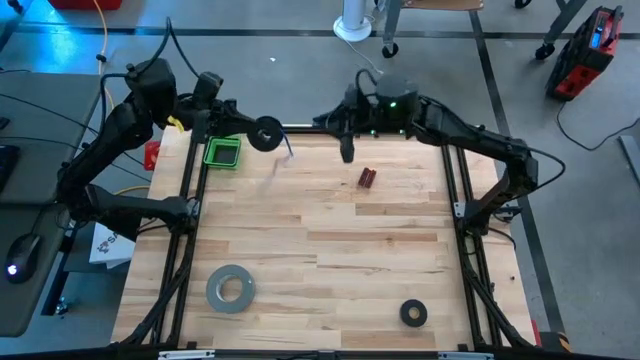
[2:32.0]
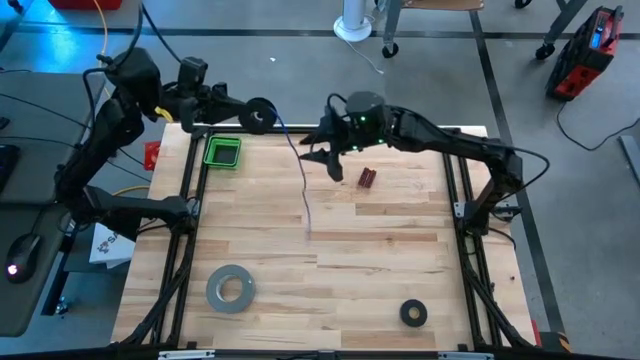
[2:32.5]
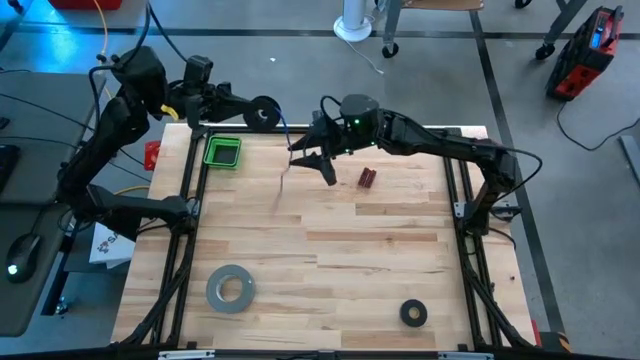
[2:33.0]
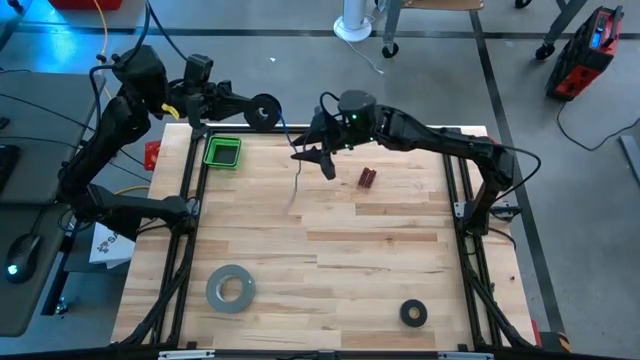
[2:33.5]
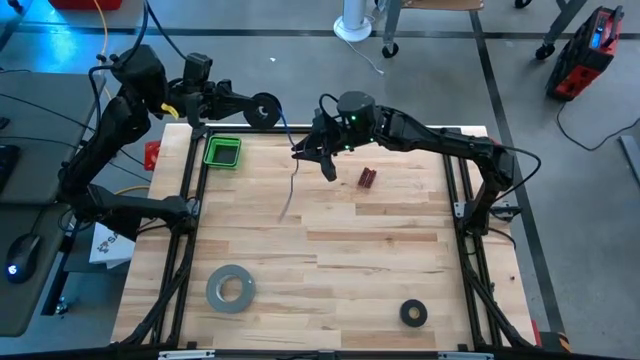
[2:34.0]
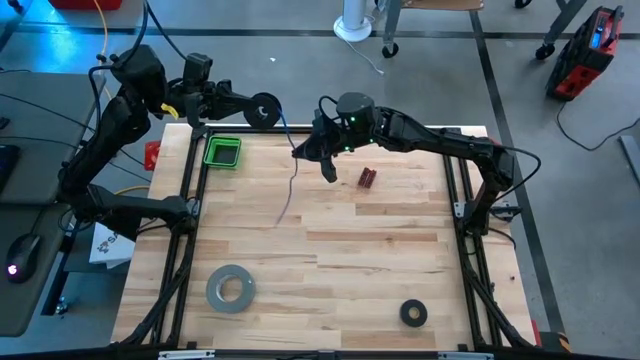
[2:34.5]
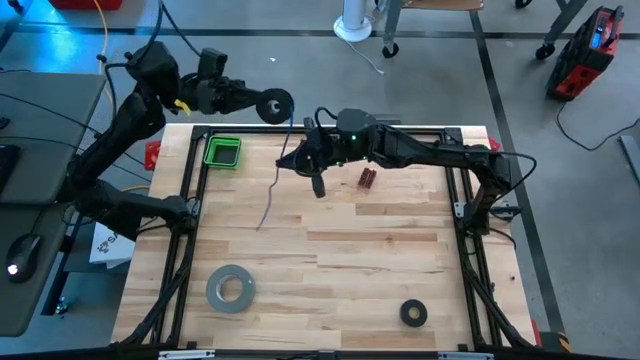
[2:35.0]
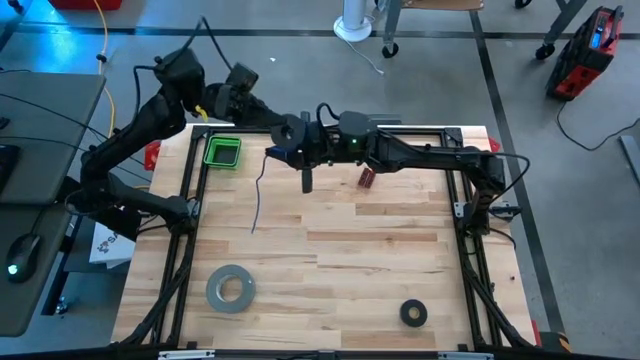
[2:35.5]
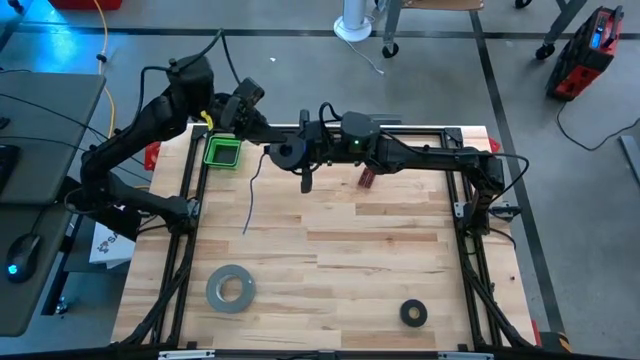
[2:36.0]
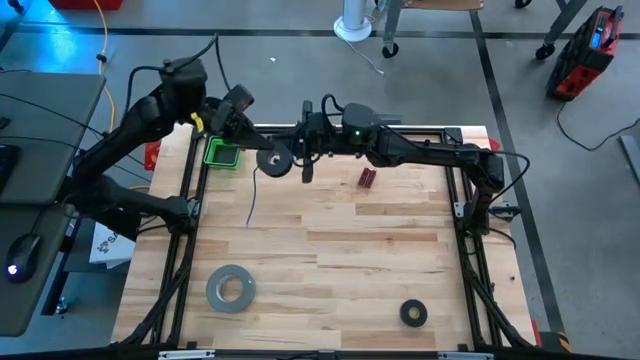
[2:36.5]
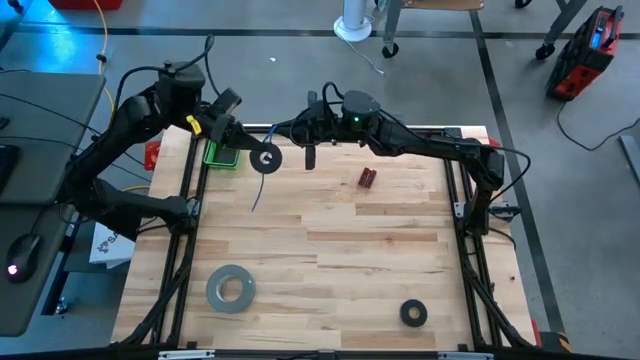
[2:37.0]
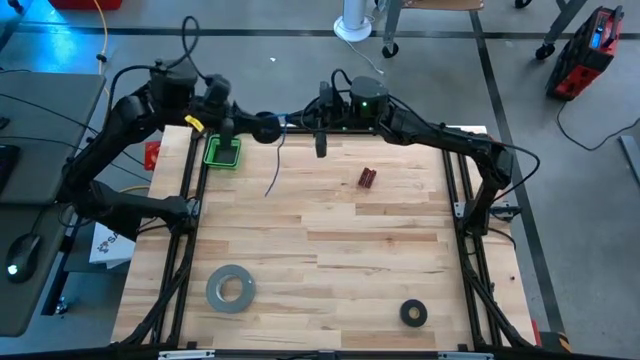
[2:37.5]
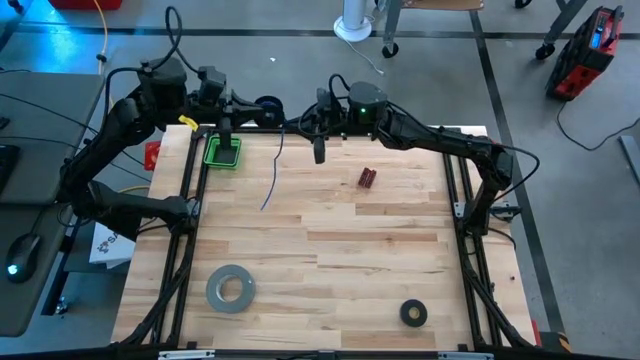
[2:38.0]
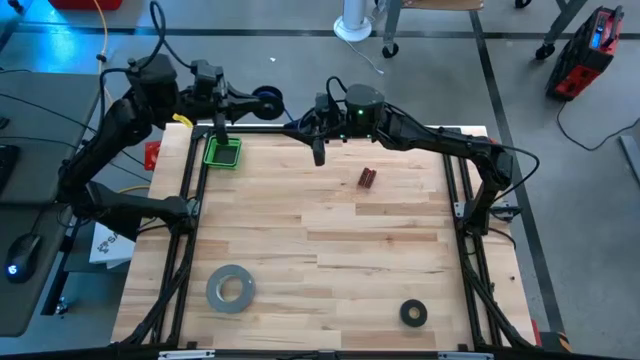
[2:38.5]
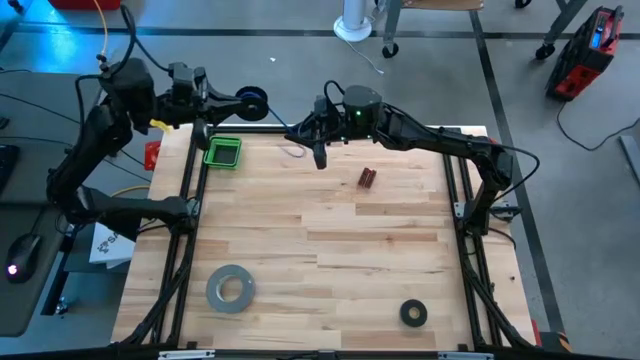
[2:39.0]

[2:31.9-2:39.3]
Task: Coil cords
Coil the blue wire onto the spool

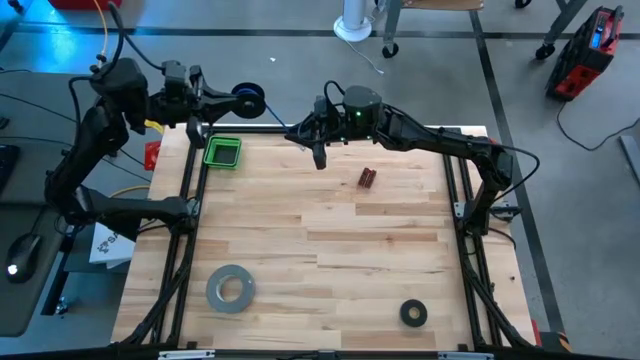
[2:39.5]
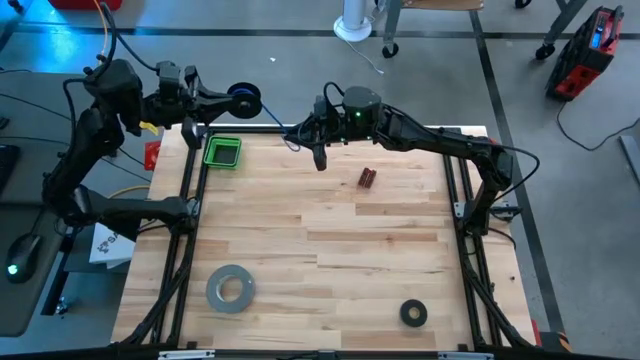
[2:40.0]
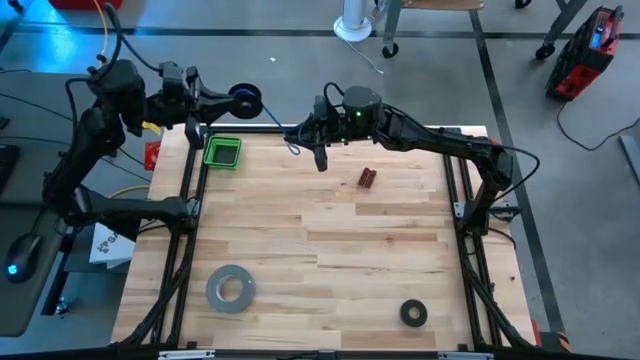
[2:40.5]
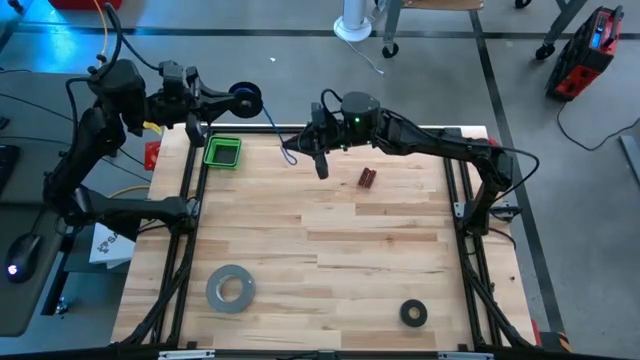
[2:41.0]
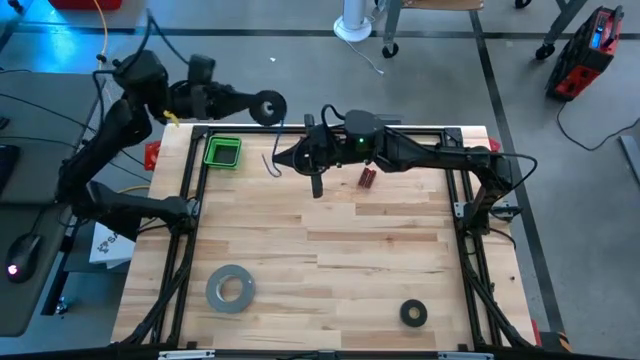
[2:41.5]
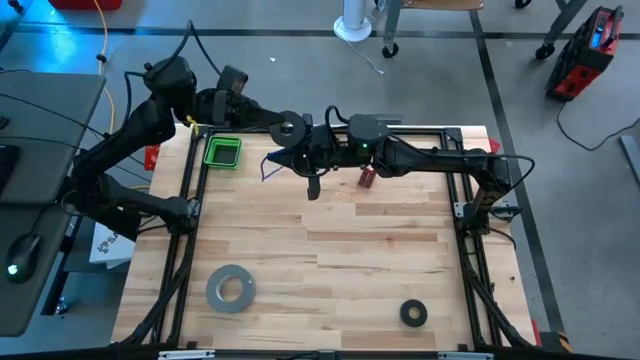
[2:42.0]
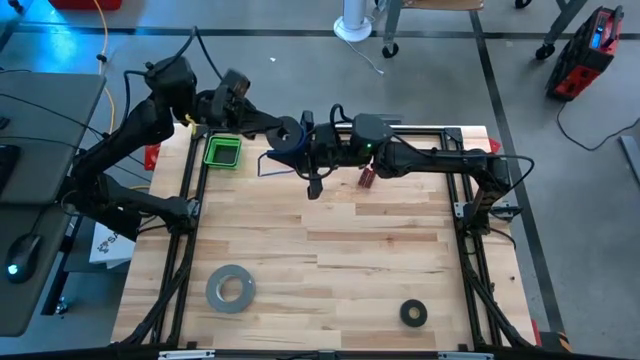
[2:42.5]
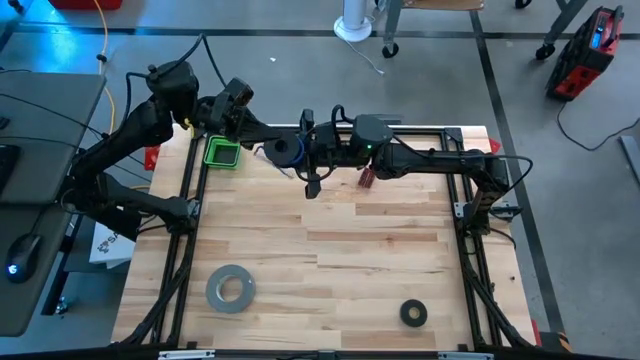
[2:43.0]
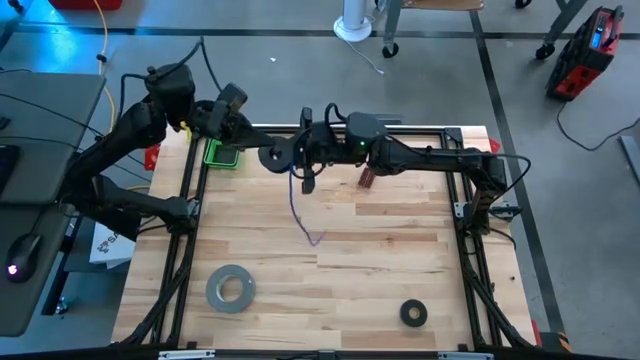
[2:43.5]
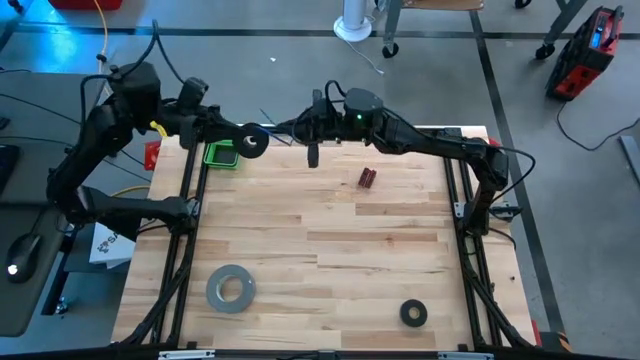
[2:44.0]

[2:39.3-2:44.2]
Coil the blue wire onto the spool

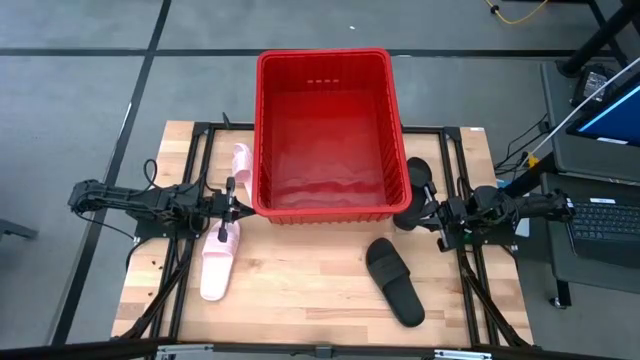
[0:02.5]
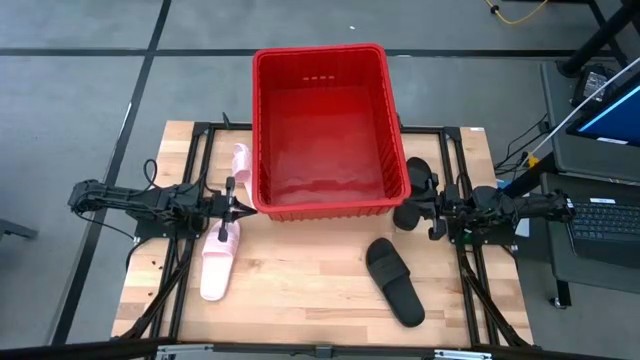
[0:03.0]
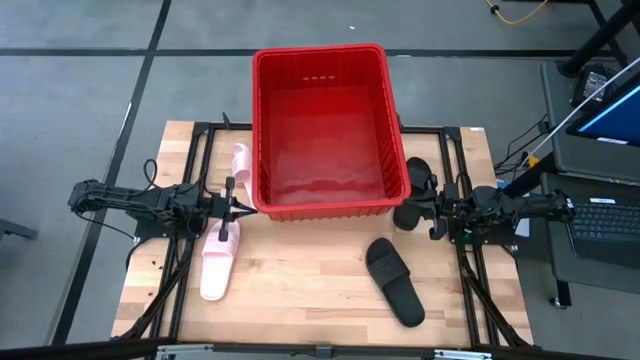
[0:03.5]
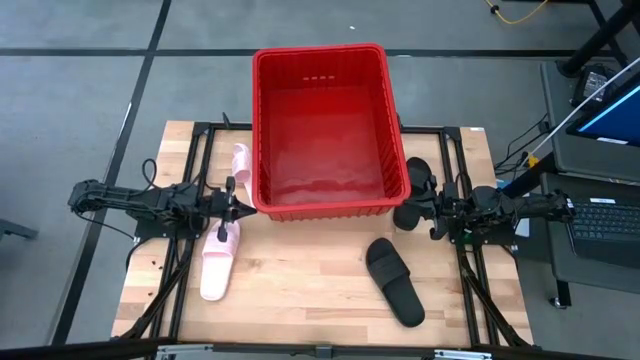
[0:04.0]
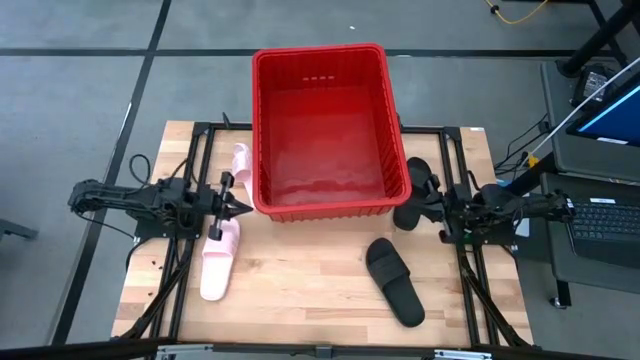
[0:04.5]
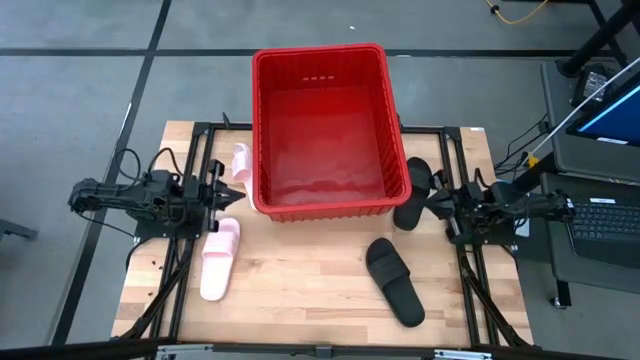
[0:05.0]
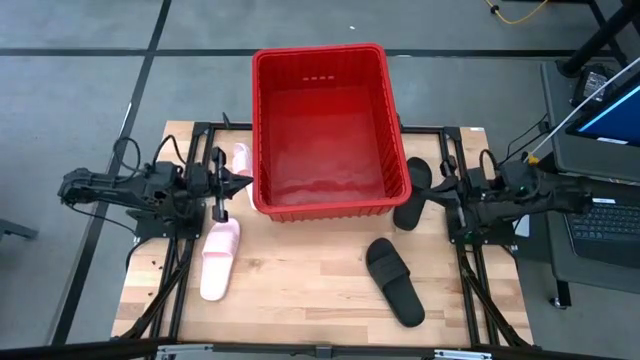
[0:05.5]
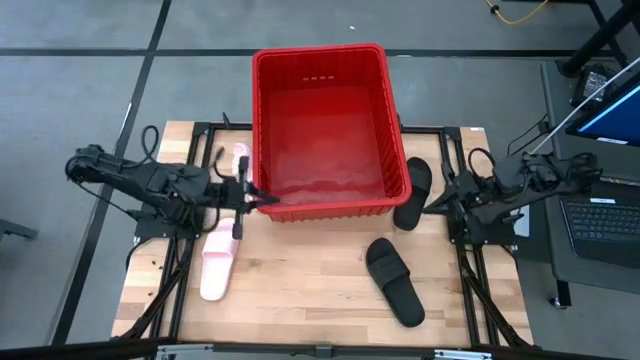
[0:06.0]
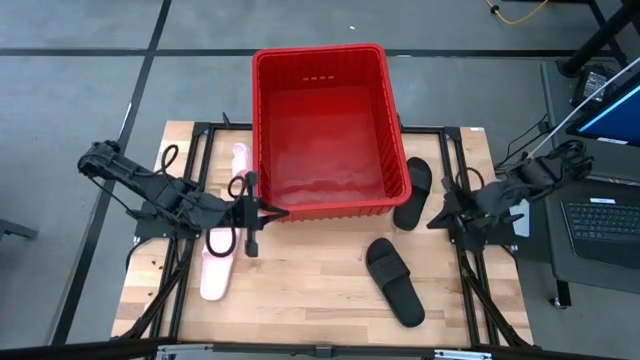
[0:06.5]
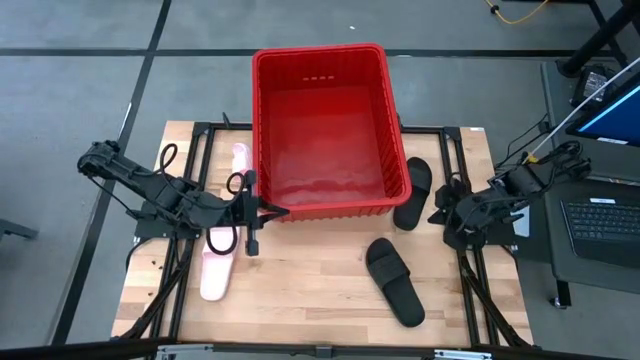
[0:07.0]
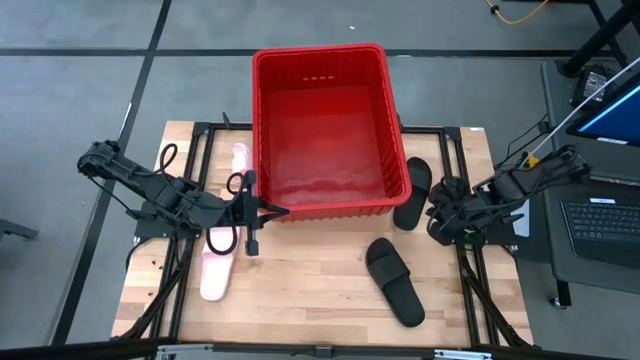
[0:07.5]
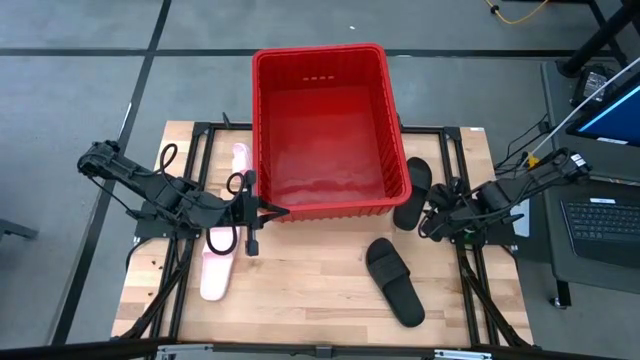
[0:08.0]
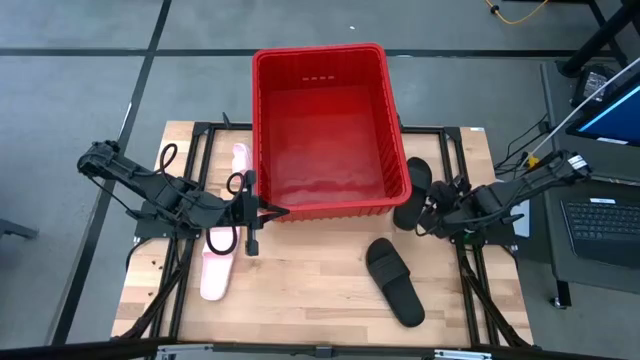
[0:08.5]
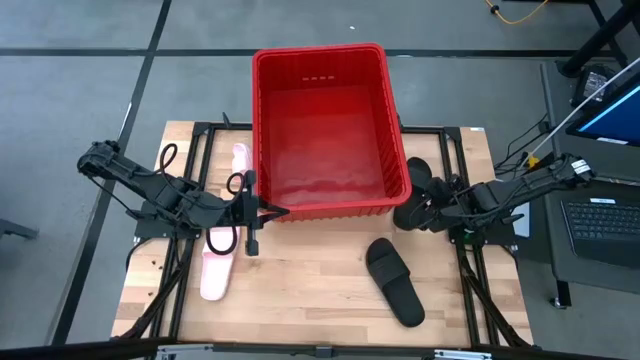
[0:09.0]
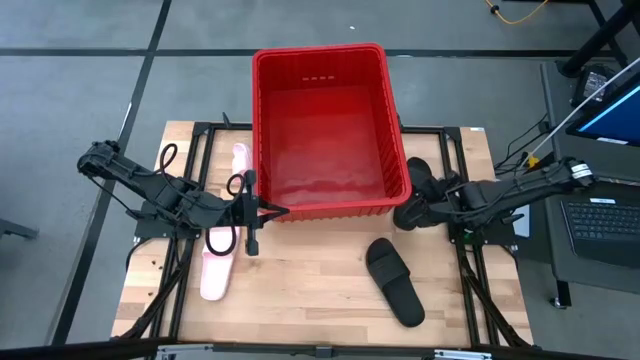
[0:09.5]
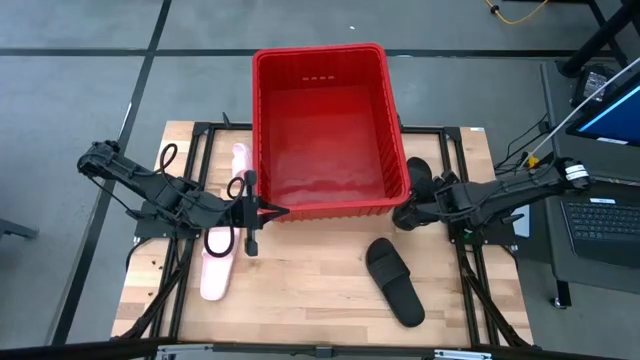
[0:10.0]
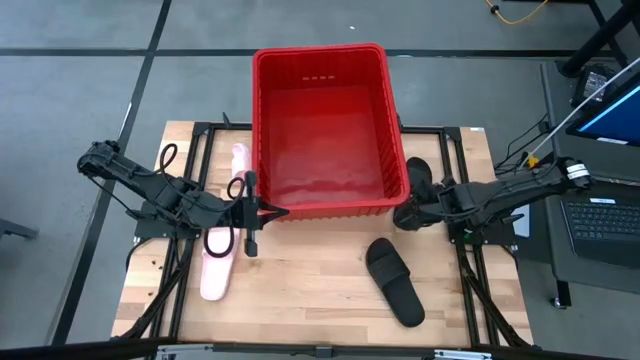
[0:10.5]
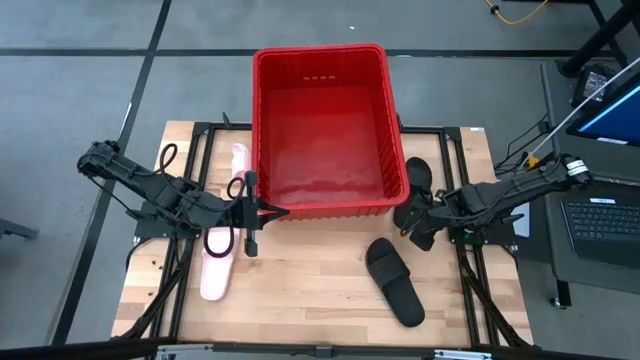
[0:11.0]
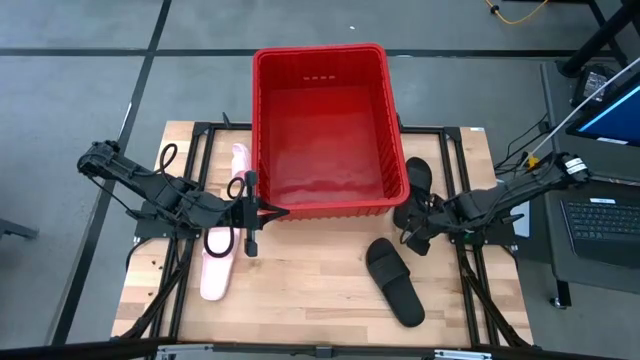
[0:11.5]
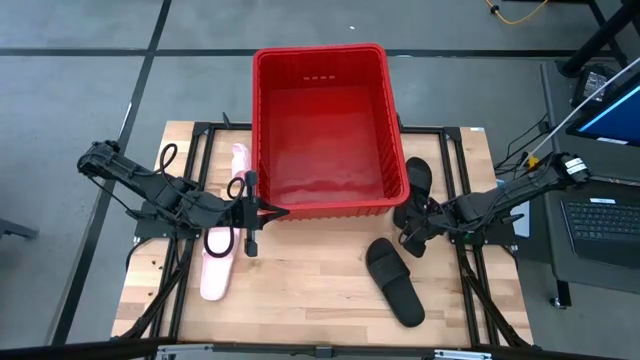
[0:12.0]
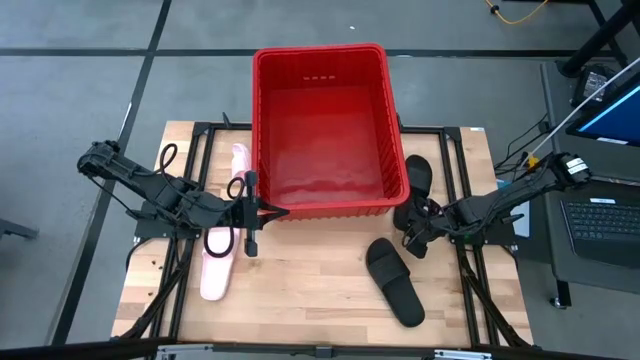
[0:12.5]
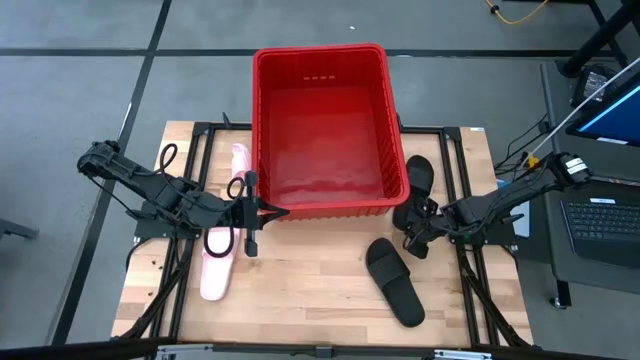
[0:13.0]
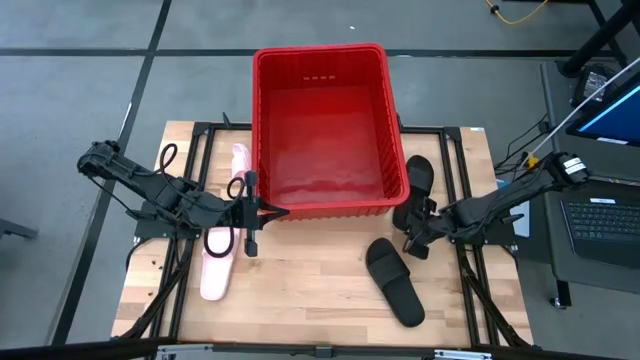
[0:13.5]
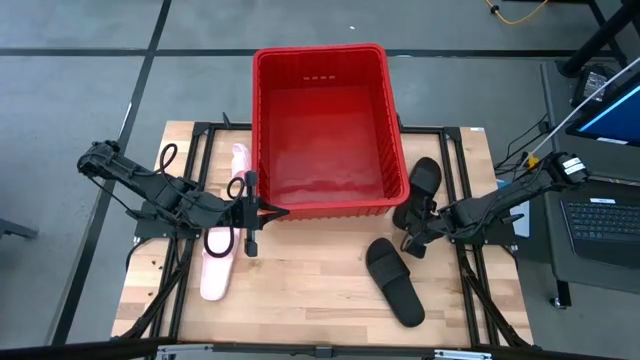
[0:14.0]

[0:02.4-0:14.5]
Task: Pick and place slides into bin
Put the top black slide in the red bin
